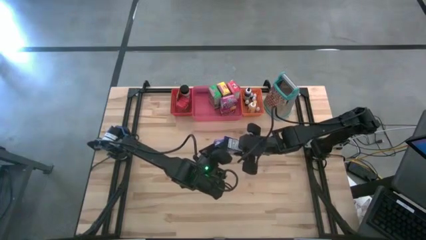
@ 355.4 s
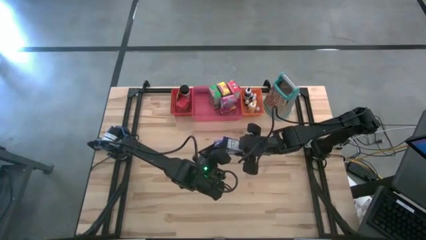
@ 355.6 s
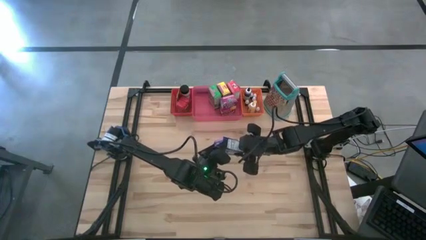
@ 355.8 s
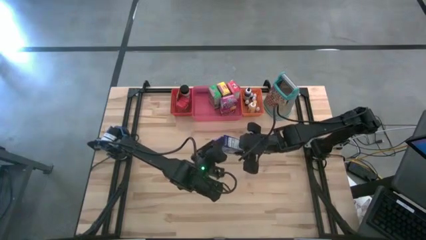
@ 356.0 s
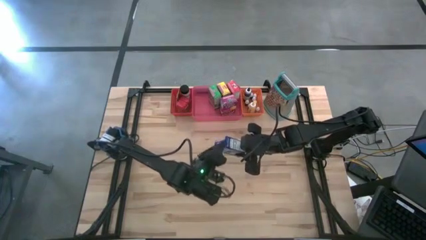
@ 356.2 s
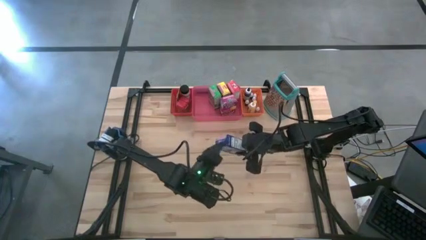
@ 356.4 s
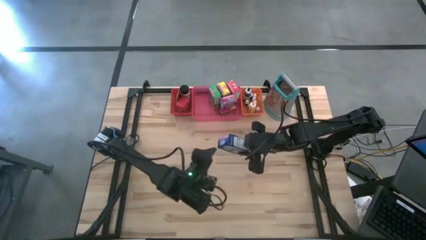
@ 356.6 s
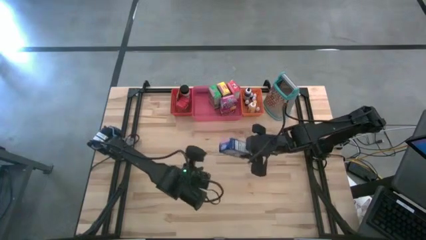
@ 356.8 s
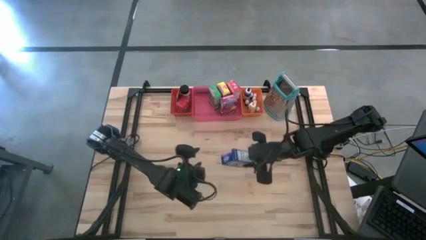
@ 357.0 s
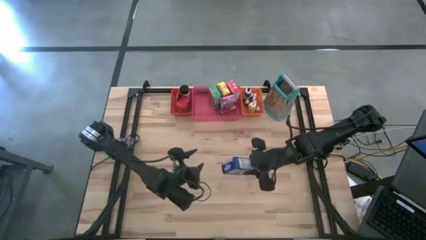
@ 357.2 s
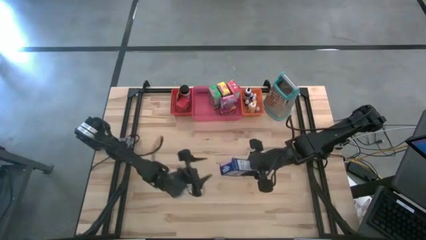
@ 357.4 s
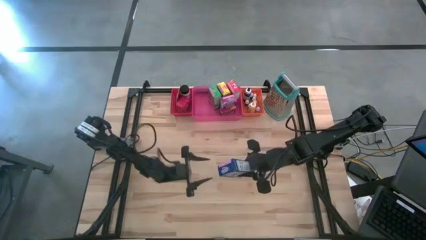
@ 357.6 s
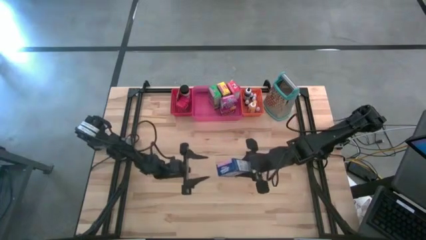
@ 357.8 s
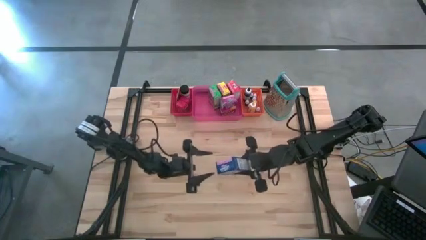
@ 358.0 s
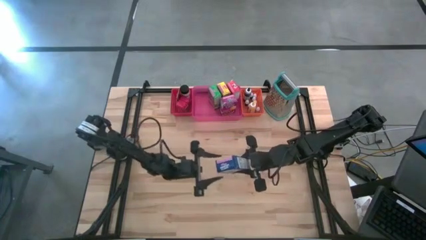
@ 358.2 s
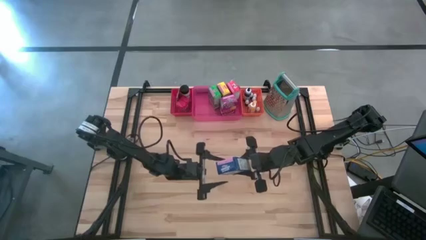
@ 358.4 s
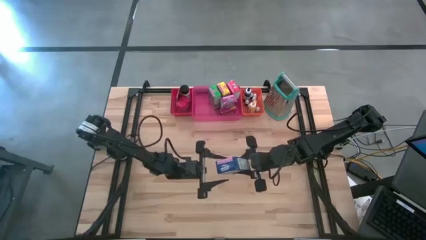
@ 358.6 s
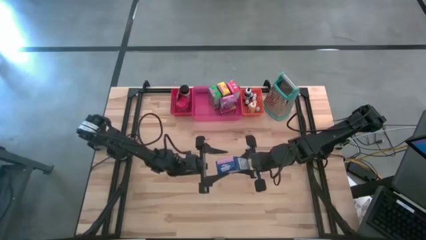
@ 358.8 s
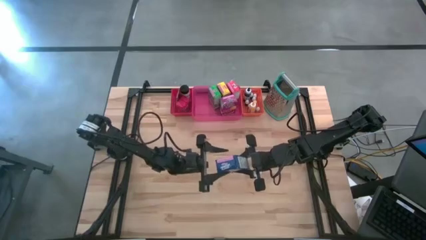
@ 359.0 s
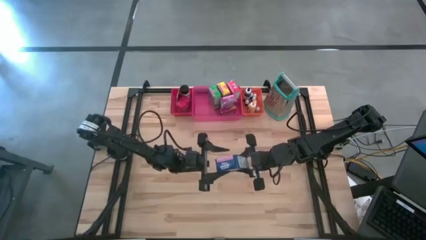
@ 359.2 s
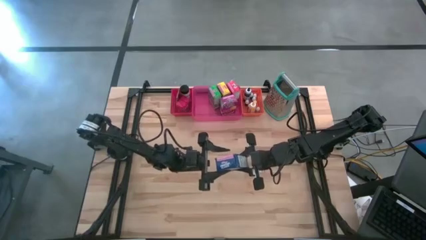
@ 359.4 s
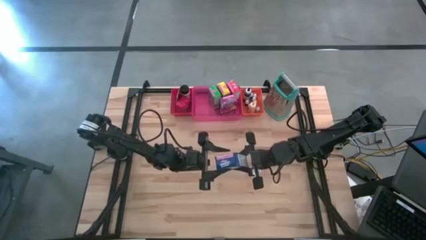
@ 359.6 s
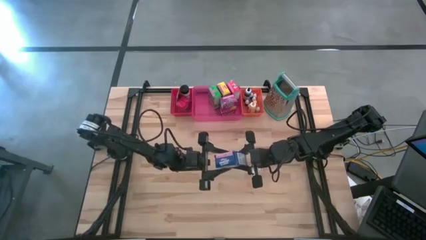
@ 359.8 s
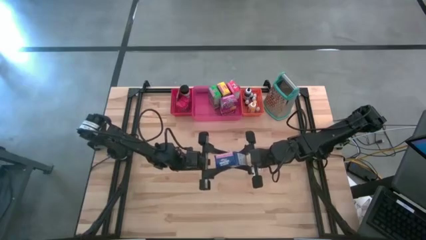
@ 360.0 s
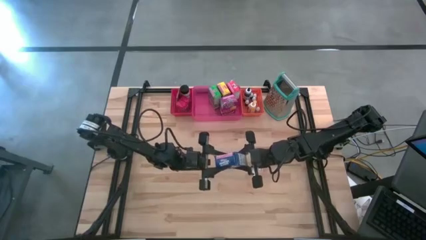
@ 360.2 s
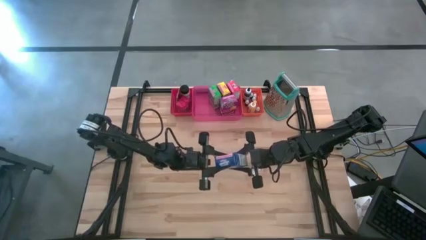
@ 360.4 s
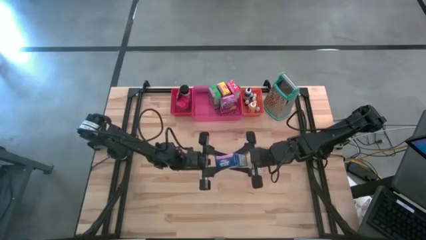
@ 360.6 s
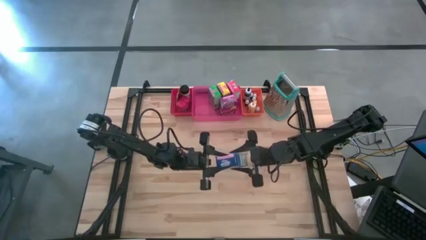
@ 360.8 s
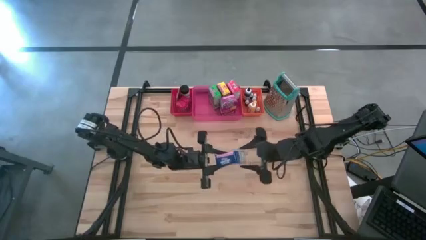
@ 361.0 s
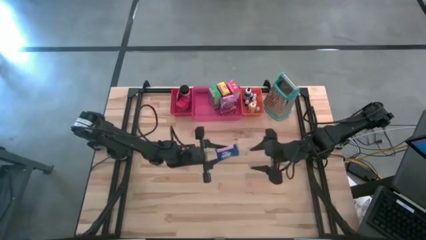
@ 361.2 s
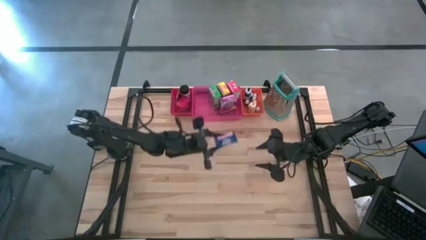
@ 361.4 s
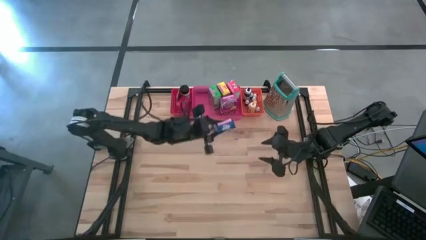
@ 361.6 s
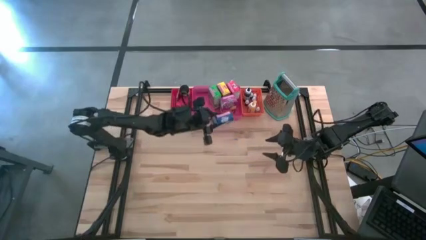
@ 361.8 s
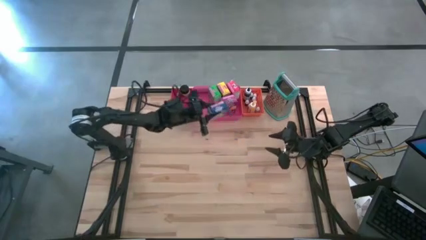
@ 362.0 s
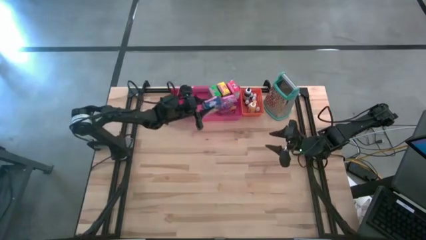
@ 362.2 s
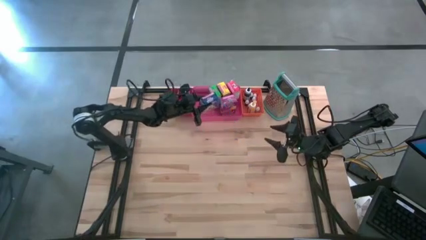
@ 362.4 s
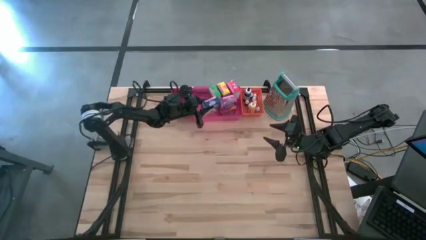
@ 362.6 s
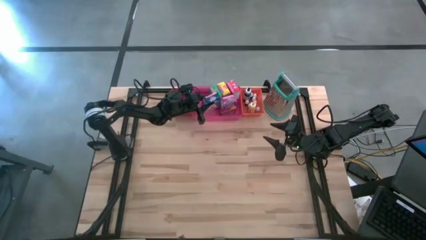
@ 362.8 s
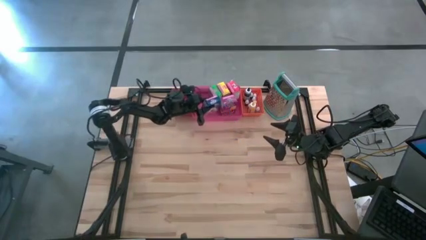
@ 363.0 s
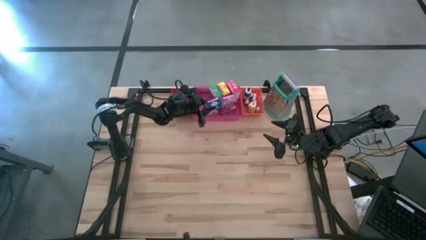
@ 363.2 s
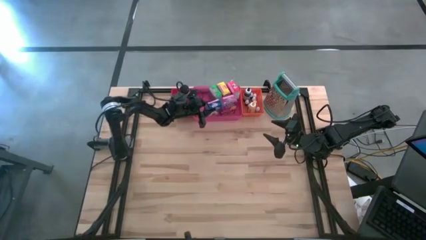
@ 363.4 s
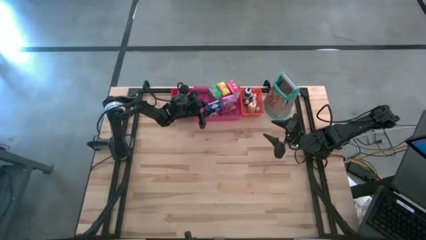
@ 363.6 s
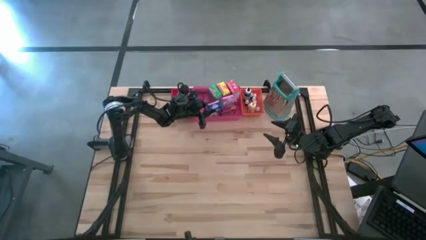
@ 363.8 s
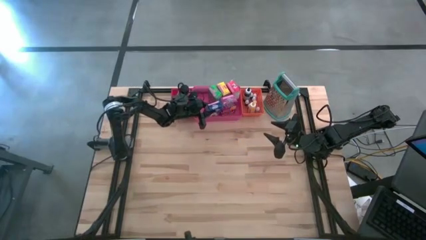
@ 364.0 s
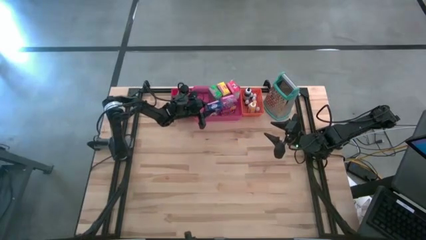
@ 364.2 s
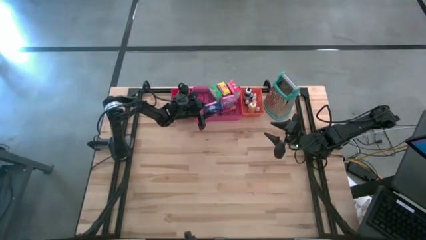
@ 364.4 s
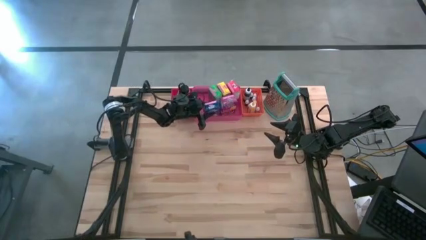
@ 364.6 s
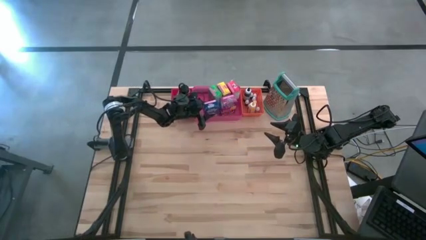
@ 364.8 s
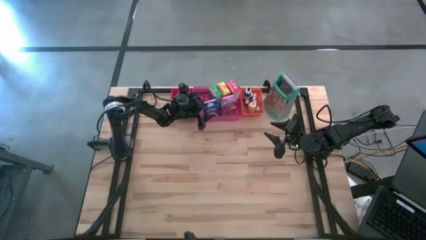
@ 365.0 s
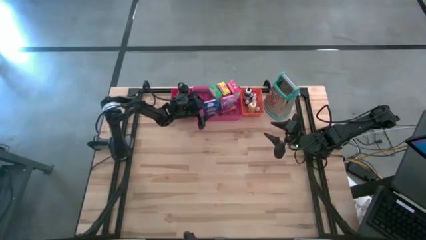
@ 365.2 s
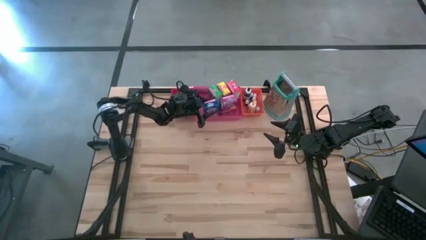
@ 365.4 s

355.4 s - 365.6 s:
Task: Pick & Place Kitchen Items
Put the blue cereal box into the pink bin

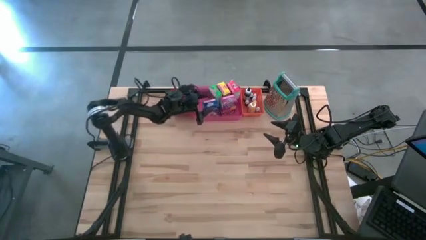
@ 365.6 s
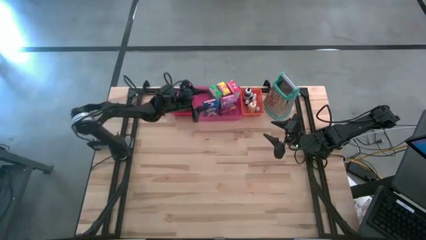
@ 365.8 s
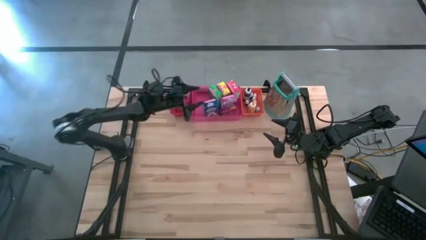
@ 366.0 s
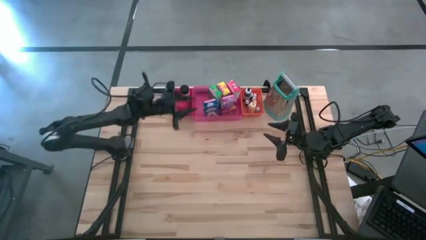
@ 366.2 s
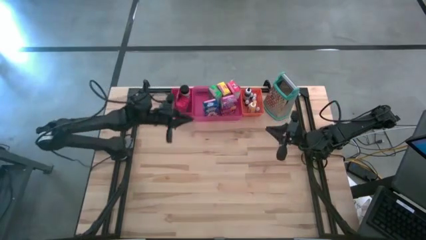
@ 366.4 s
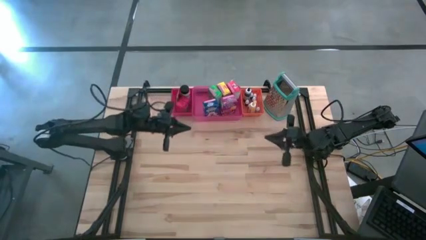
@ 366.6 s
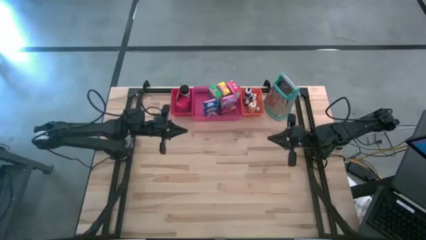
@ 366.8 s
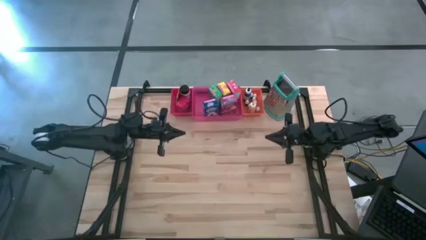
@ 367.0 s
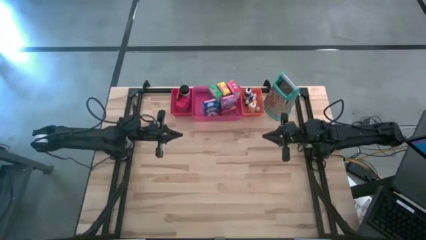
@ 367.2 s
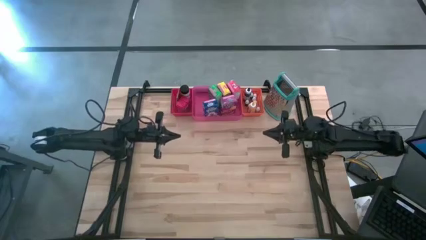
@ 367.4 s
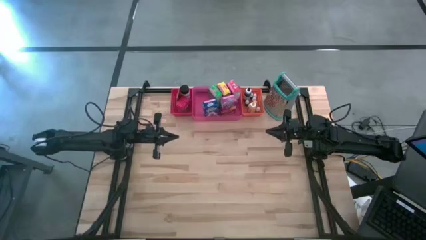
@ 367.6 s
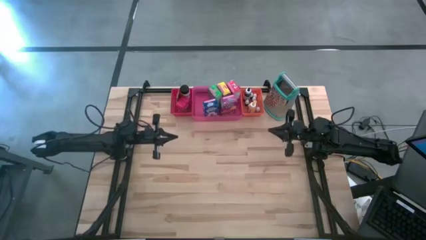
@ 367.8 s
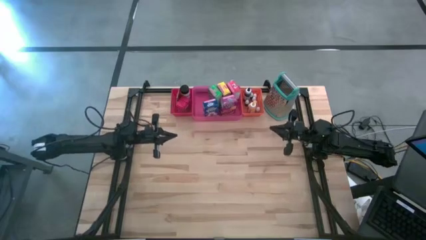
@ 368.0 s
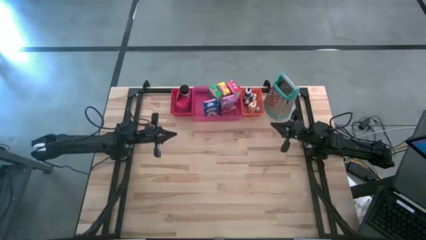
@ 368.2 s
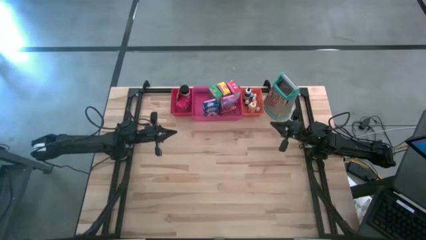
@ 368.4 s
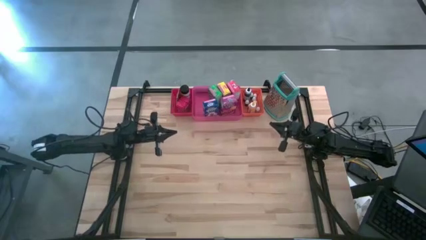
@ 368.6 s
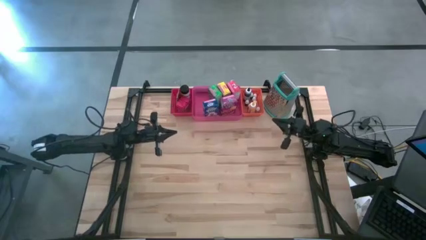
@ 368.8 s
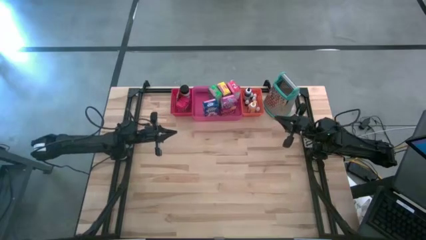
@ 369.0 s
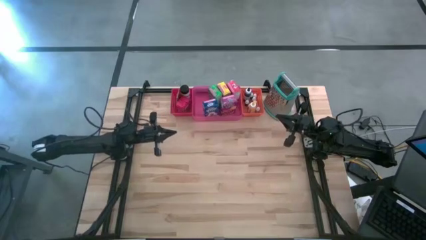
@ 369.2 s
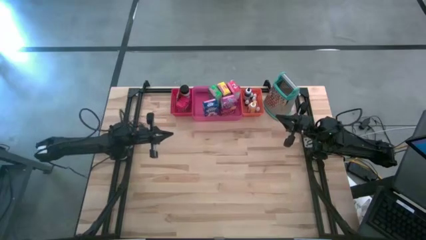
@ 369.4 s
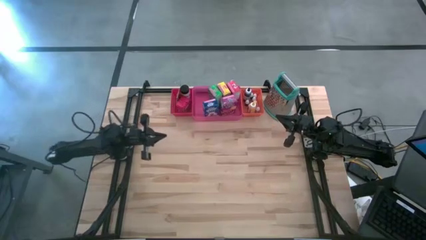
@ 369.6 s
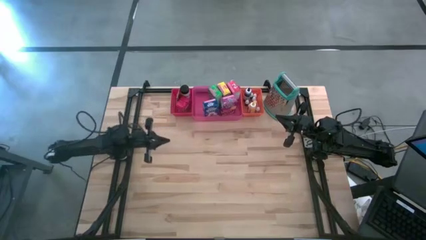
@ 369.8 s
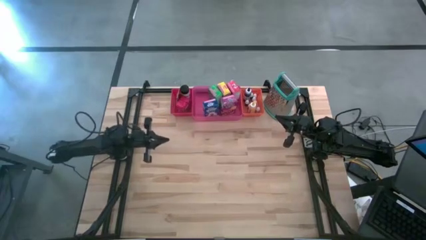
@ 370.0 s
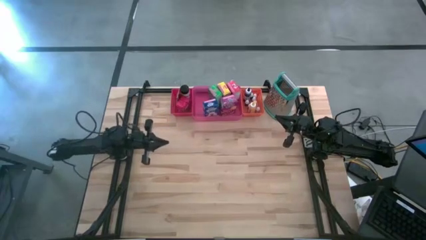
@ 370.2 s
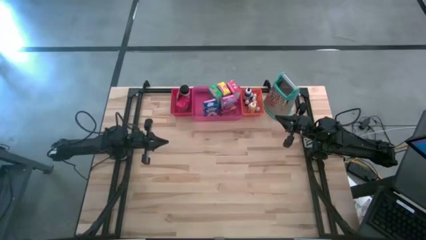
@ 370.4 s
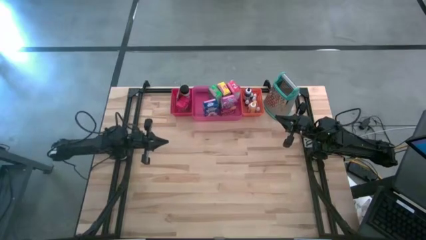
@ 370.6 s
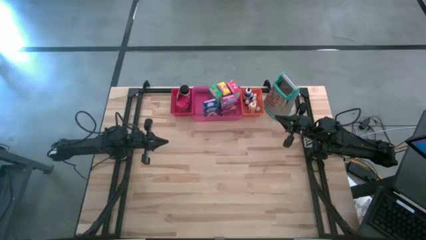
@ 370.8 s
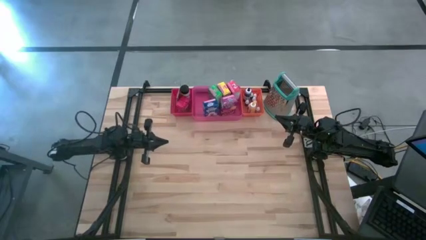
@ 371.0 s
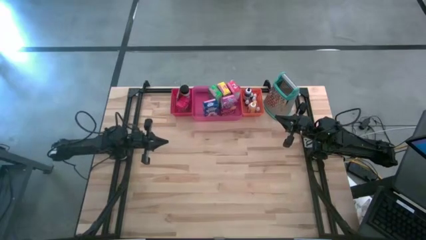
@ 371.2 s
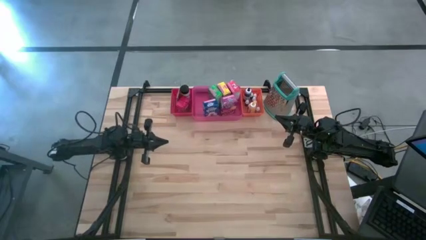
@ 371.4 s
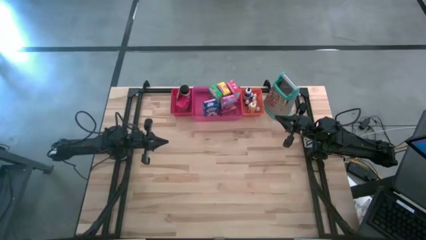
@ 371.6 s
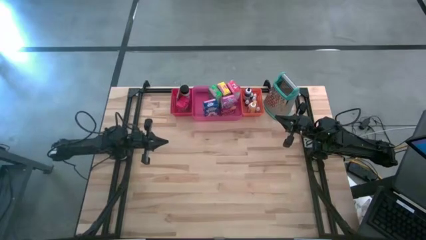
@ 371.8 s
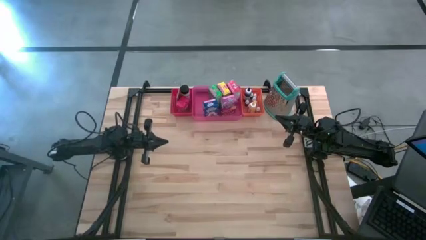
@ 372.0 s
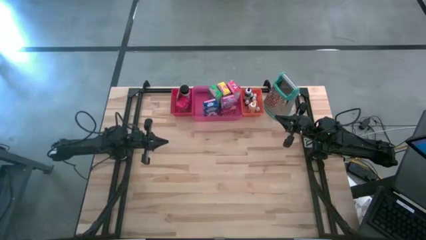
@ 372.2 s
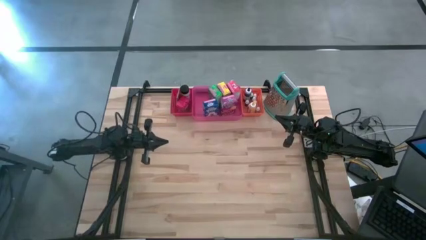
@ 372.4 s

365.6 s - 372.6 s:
Return to Home Position
